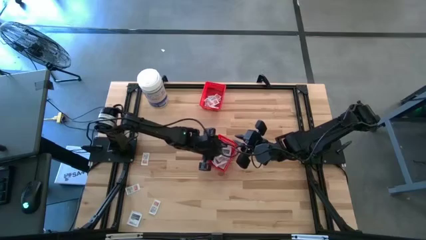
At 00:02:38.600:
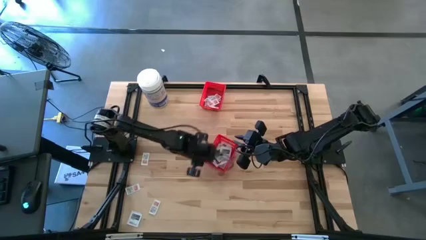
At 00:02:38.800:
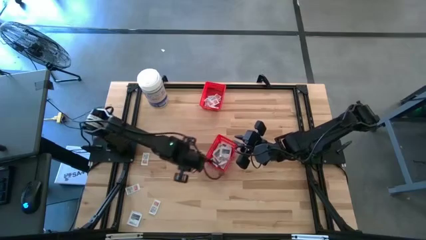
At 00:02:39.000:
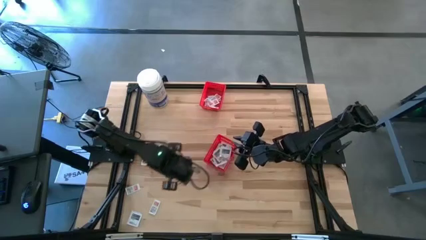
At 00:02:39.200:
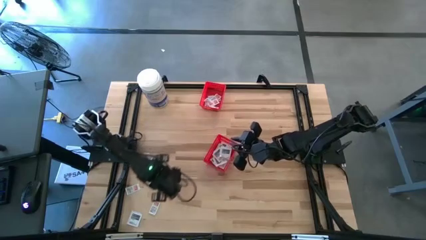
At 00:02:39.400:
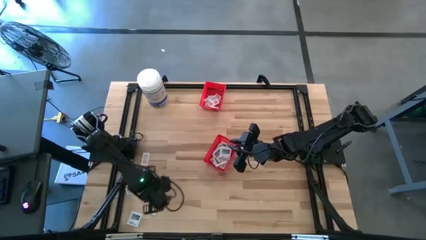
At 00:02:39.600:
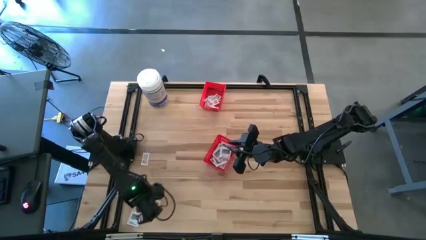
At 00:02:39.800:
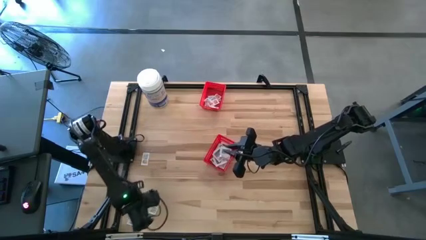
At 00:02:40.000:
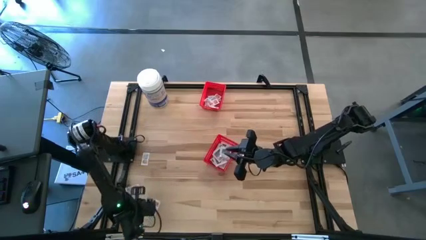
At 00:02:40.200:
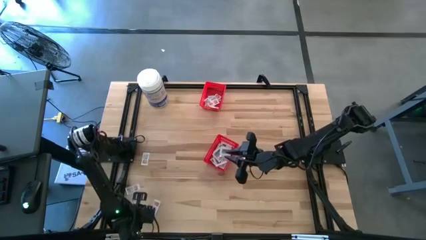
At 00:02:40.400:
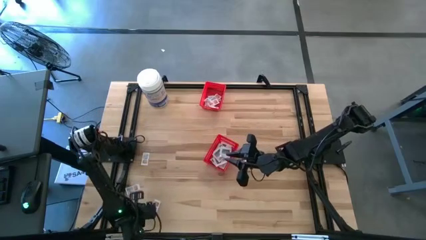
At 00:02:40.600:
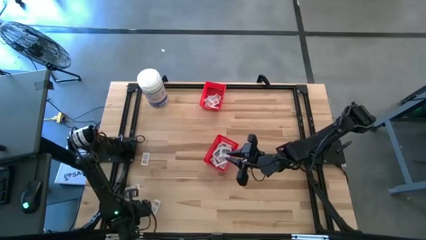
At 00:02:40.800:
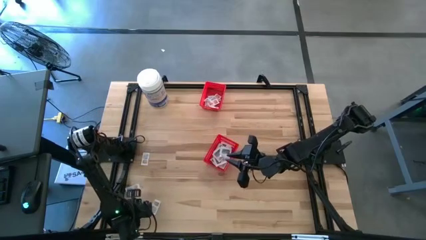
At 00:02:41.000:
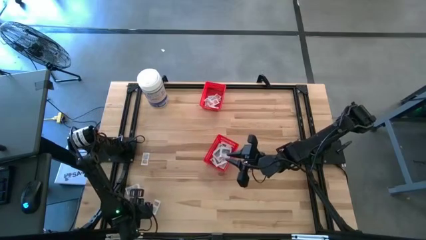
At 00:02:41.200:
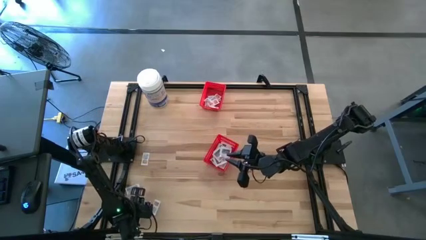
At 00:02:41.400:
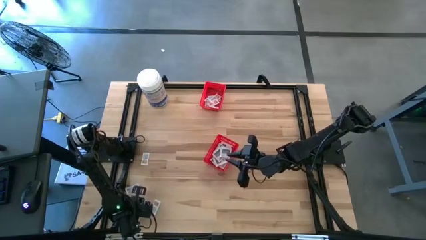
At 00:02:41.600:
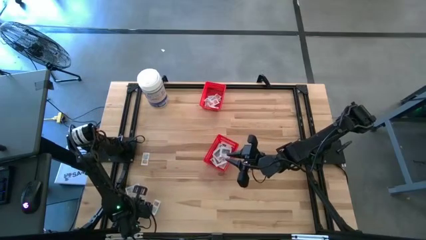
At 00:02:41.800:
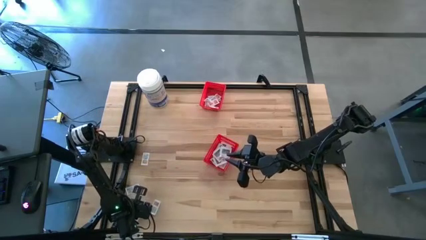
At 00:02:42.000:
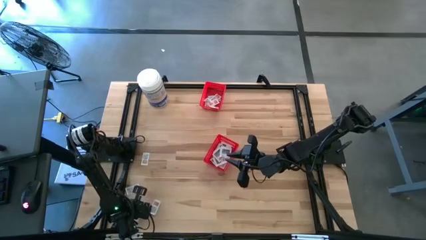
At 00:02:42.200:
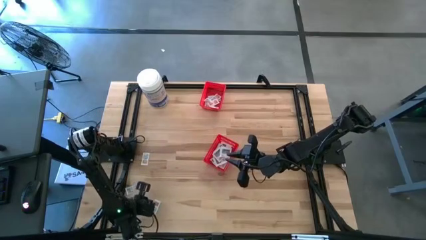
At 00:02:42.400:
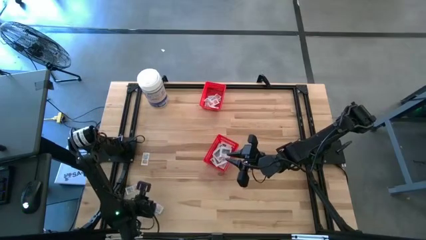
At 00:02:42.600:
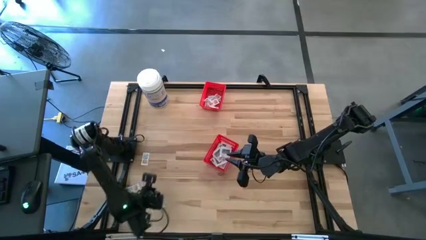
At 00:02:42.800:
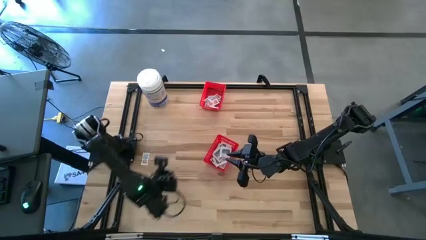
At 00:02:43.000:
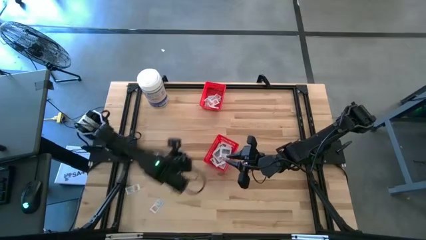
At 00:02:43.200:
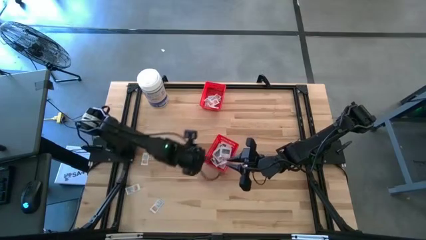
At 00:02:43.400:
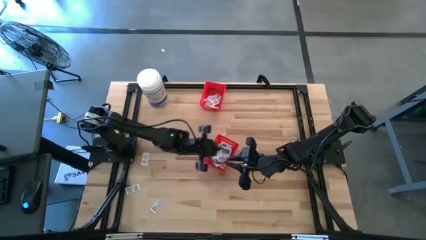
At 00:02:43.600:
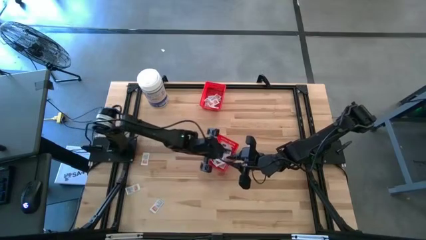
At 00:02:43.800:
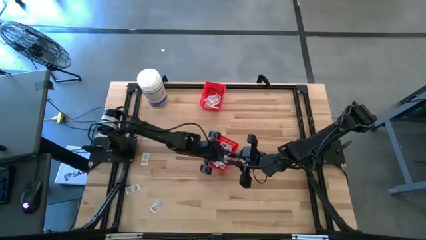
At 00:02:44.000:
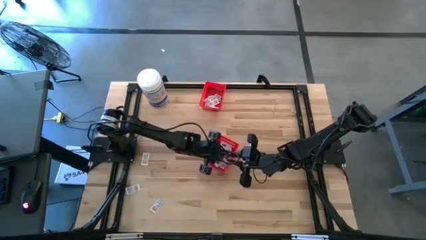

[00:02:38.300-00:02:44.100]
Task: Pick & Place First Aid Supplies
Put the white towelette pack into the bottom red bin

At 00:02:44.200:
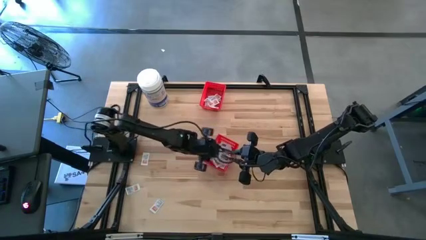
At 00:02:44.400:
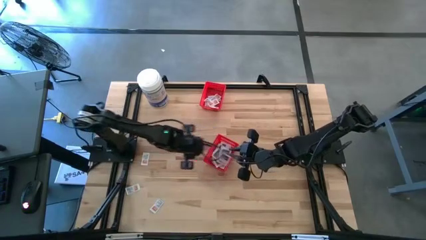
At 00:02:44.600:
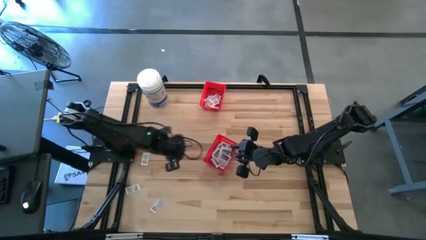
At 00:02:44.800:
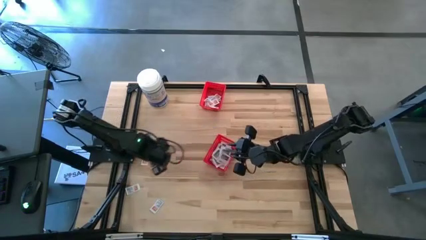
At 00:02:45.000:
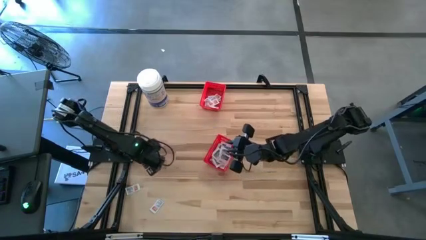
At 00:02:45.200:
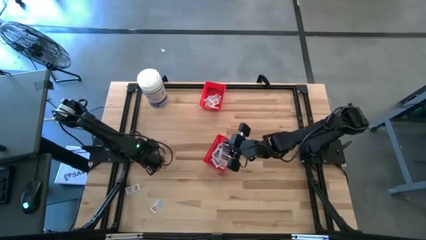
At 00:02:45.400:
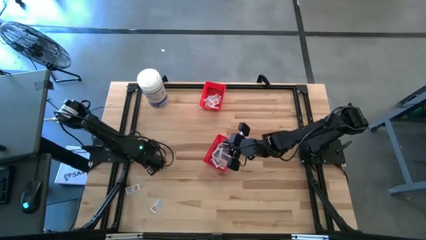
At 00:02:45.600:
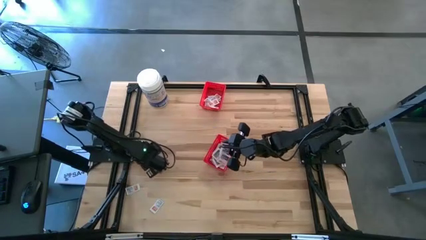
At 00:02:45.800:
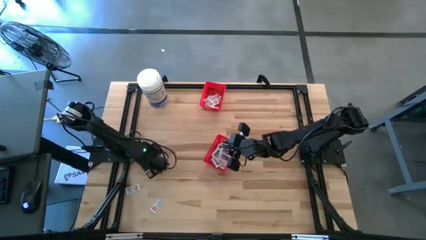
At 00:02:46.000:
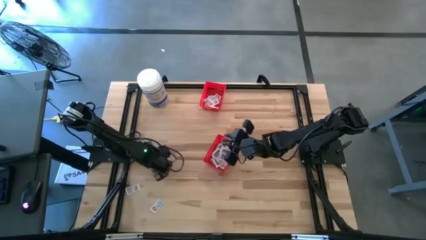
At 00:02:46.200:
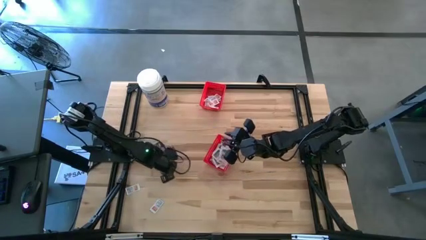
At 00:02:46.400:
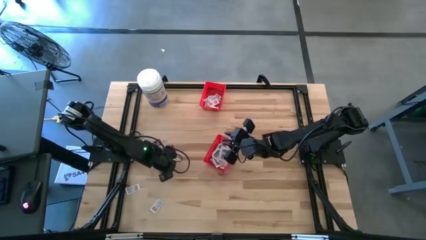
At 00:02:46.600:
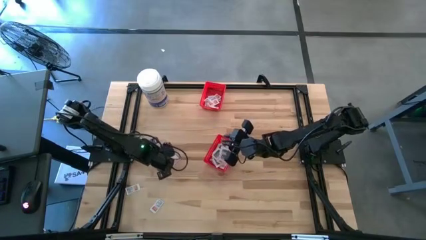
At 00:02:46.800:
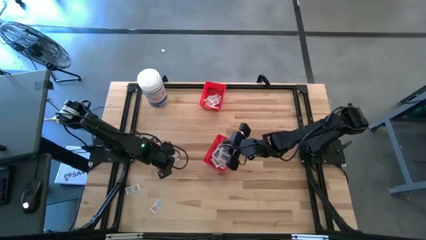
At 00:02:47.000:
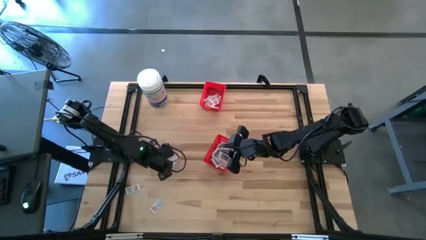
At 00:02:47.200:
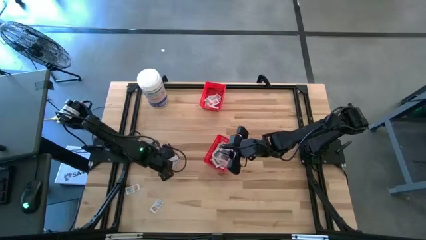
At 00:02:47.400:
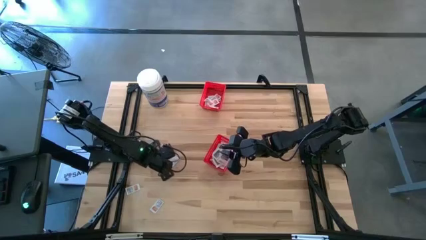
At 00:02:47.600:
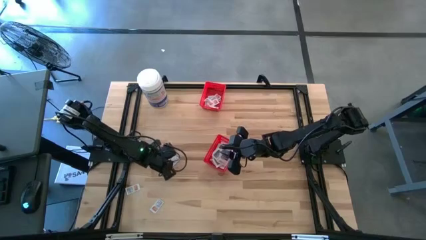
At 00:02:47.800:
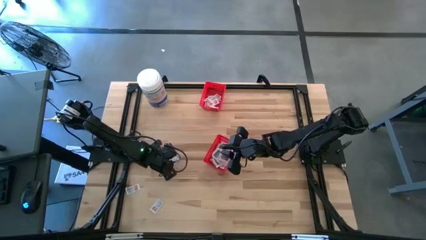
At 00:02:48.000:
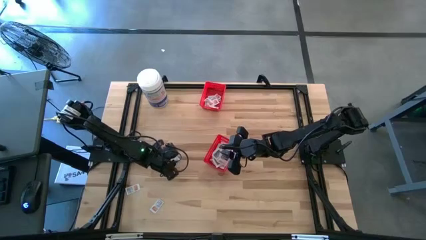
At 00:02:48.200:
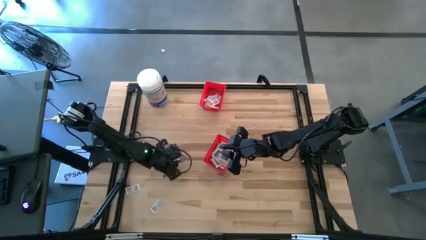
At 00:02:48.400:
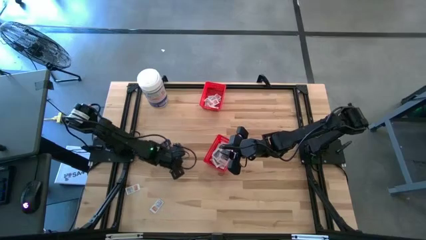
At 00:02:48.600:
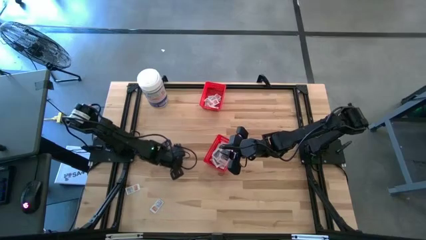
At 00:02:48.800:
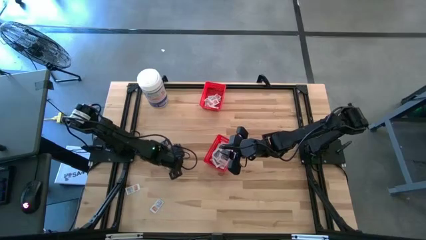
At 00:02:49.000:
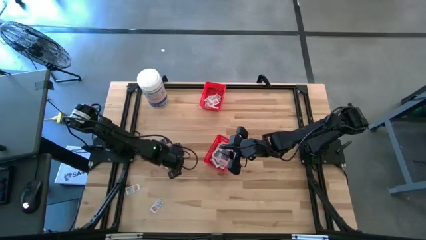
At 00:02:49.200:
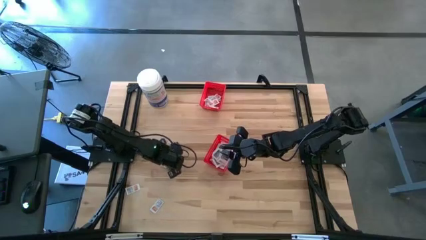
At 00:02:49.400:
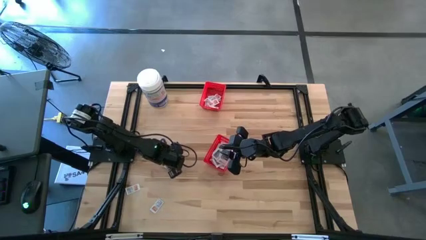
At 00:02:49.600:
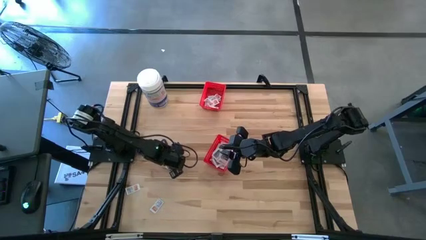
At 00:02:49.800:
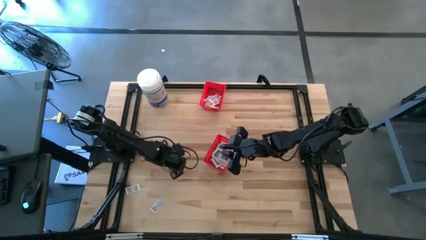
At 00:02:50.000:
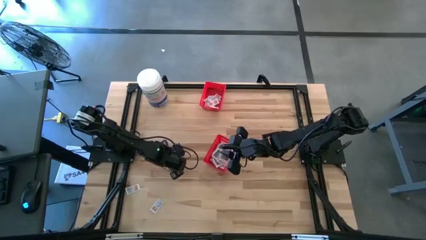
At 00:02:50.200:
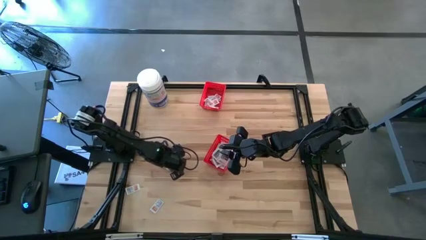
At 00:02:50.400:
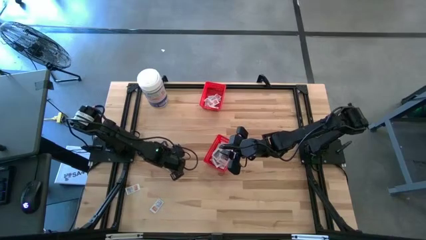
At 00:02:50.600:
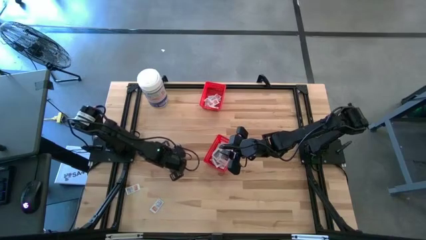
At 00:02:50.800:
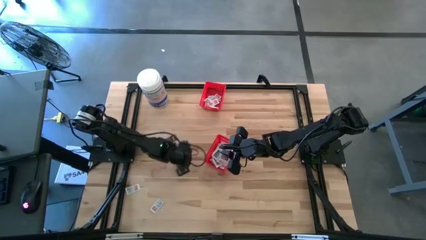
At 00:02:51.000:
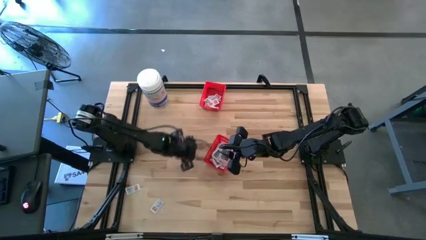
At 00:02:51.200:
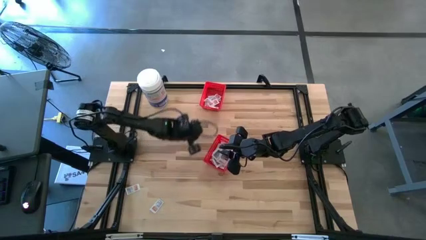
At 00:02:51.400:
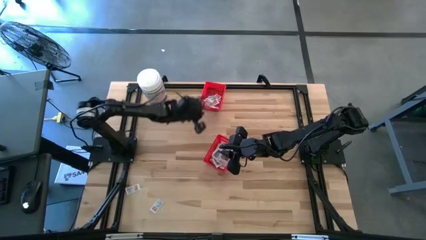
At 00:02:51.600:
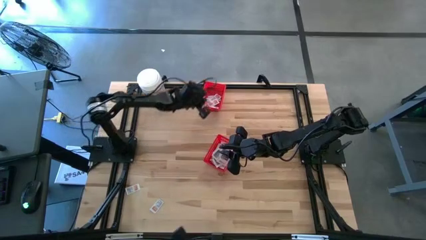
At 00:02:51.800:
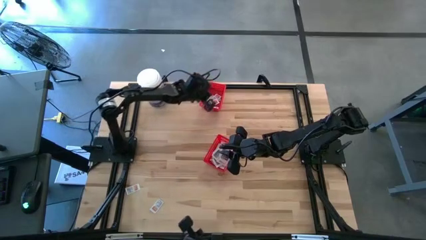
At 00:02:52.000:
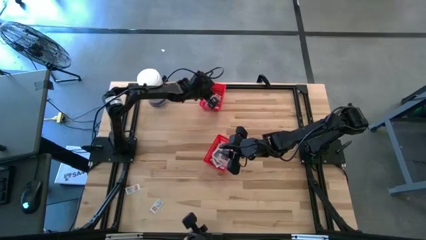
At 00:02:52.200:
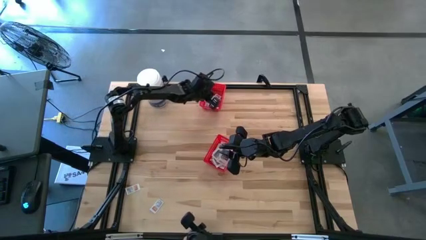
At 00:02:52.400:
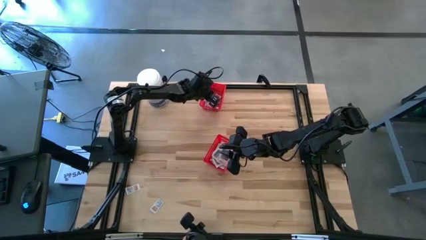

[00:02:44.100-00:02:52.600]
Put the white ointment pack into the top red bin
